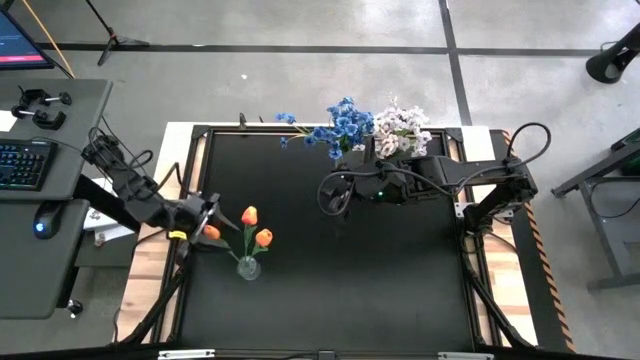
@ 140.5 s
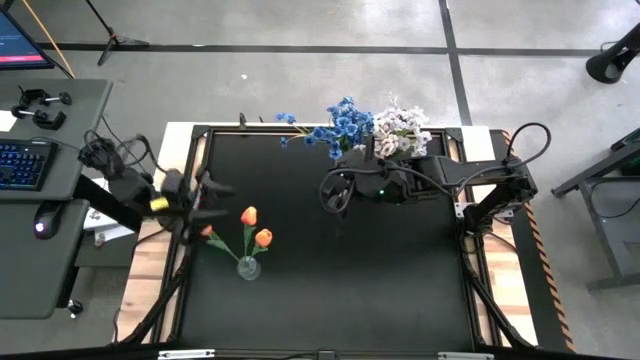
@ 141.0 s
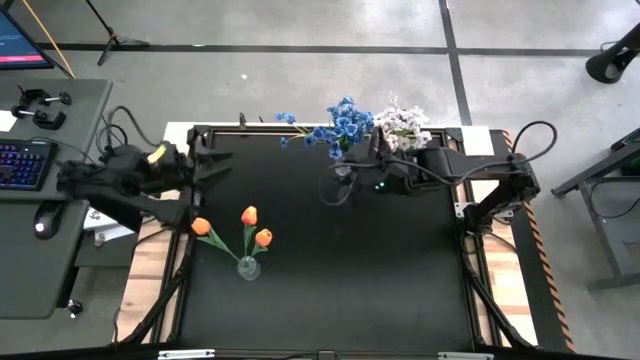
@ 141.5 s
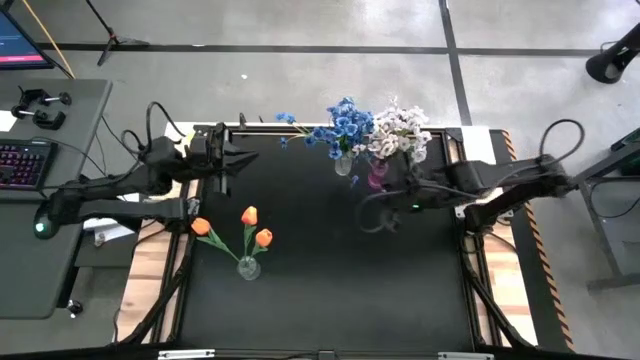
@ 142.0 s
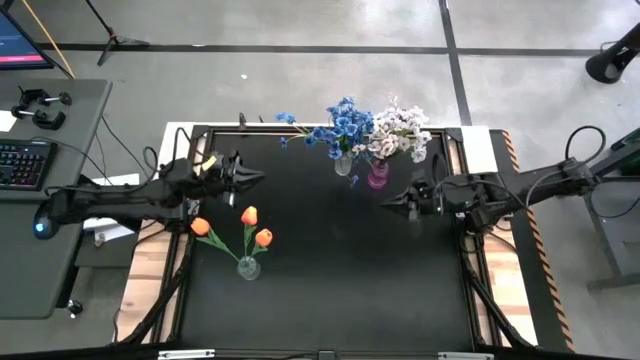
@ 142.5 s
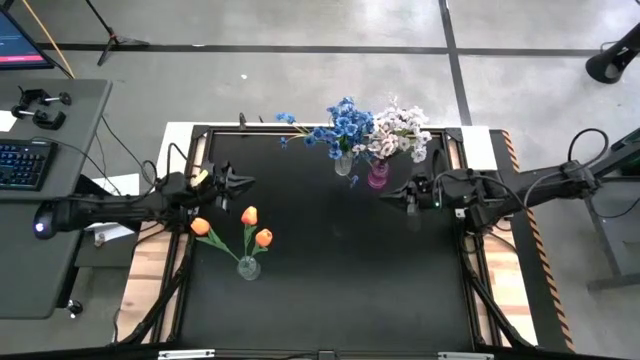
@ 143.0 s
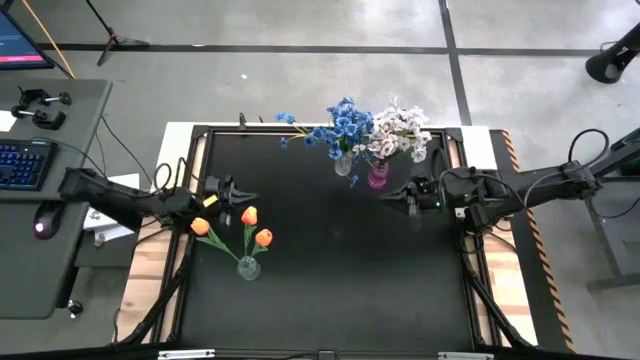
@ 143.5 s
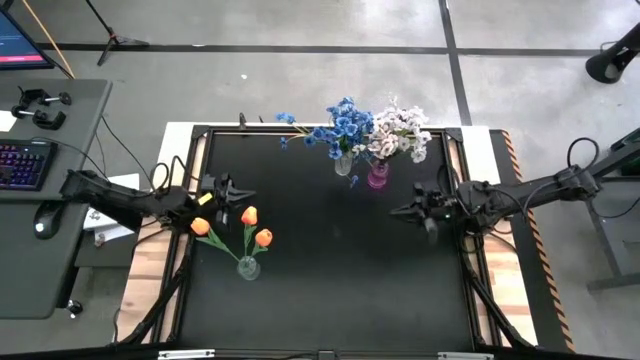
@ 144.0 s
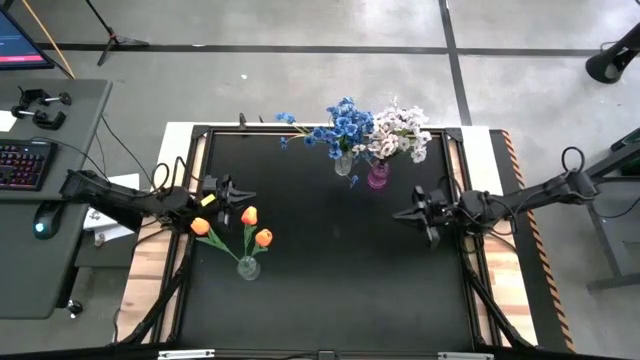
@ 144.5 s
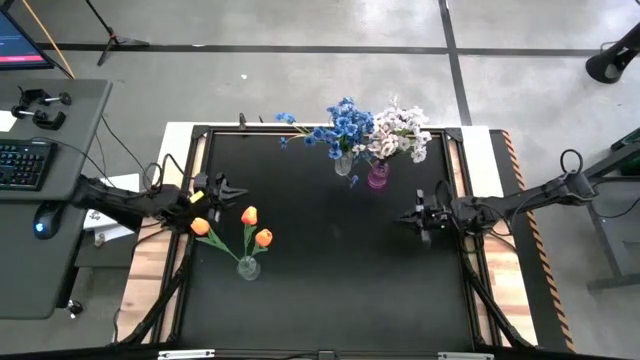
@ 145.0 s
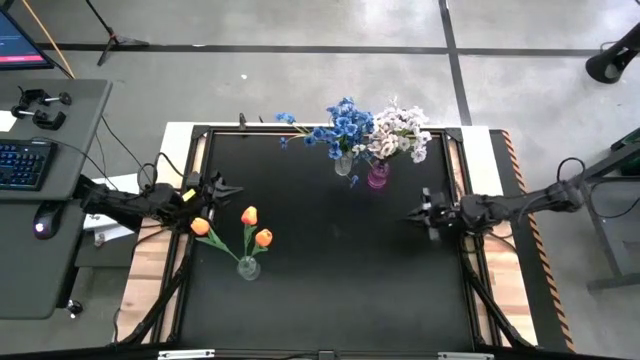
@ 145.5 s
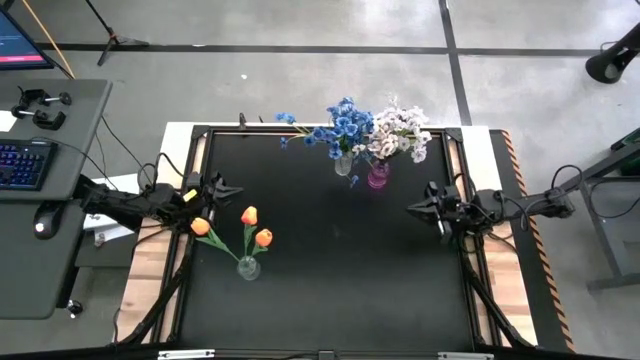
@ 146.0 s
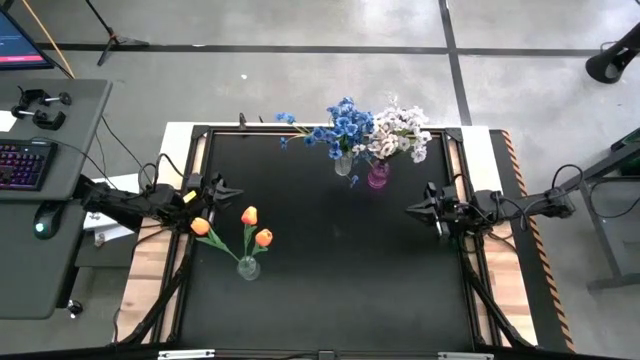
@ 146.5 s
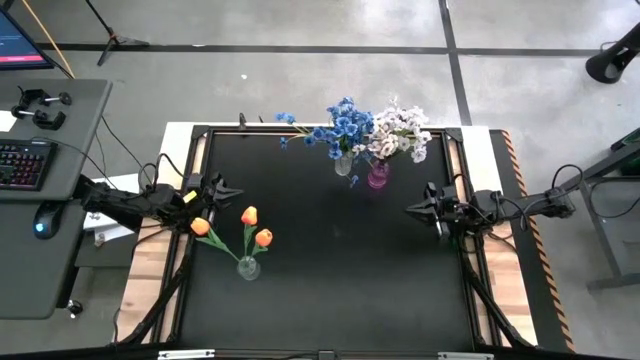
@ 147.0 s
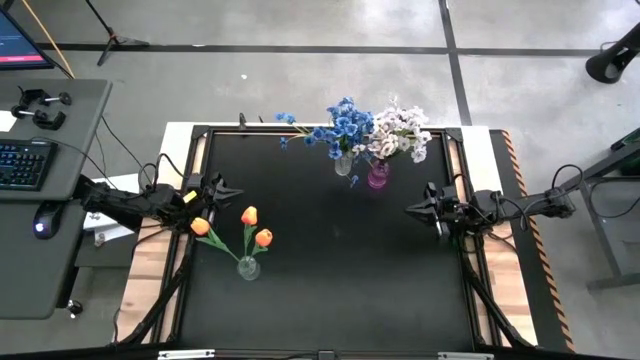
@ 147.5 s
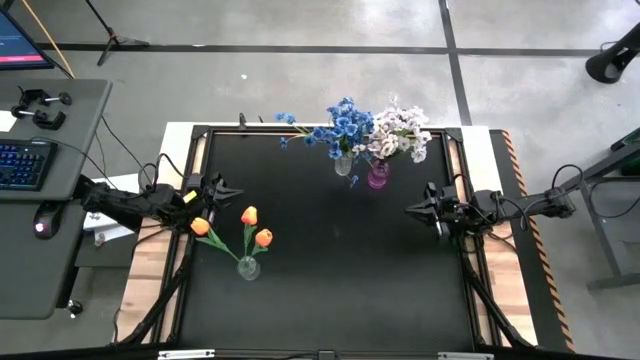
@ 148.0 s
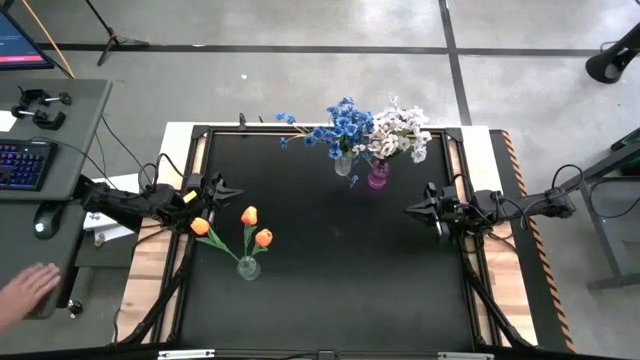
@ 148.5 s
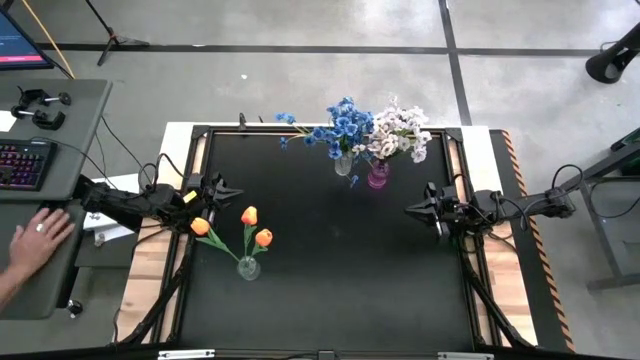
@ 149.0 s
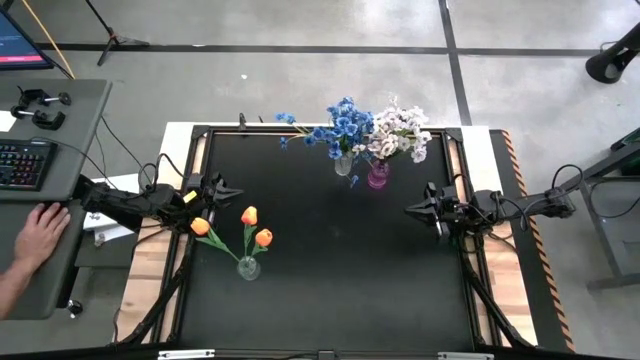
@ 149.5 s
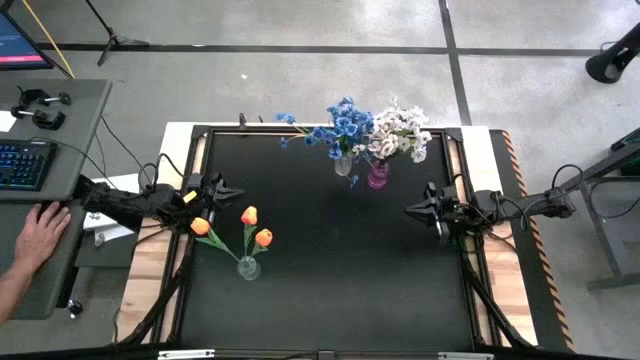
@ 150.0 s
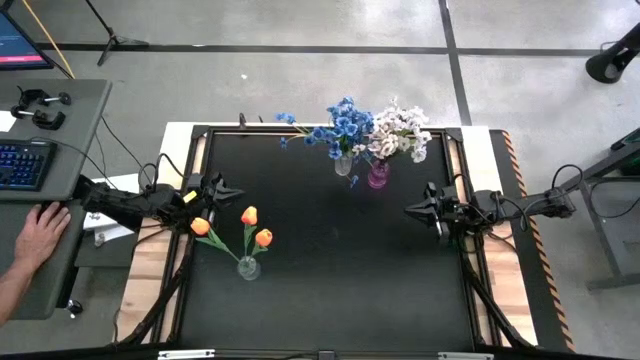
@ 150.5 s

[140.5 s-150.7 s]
Task: Sort flowers into vase by color
Return to Home Position

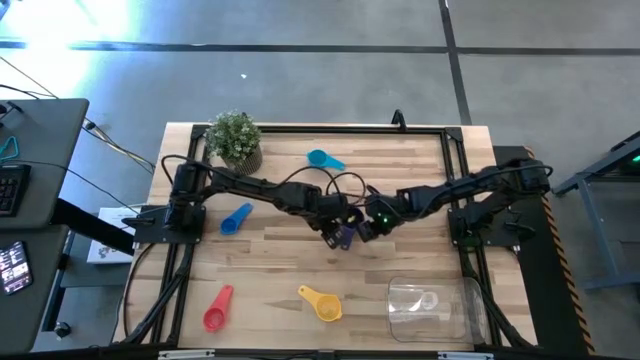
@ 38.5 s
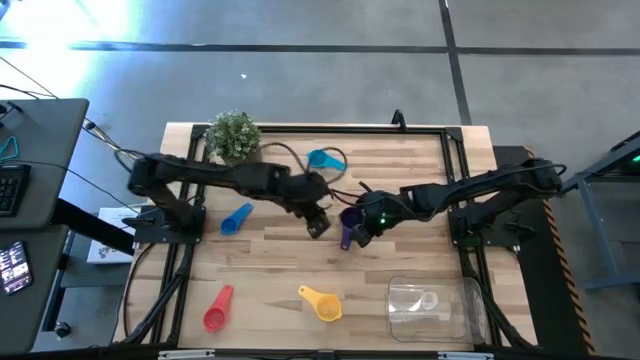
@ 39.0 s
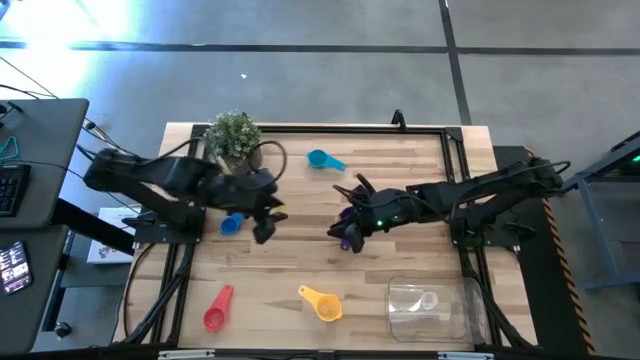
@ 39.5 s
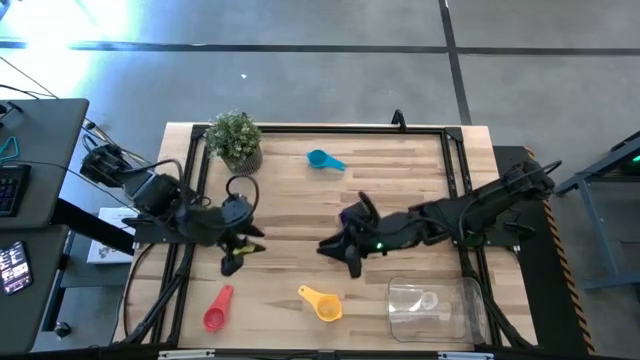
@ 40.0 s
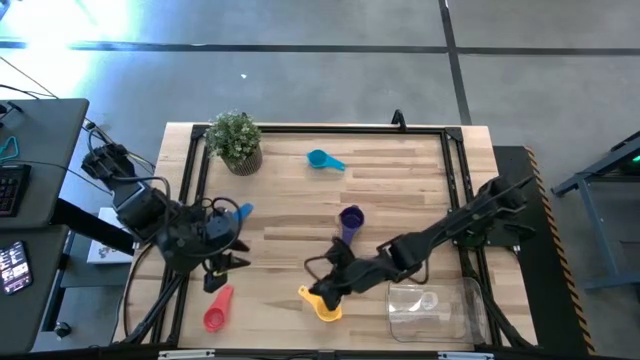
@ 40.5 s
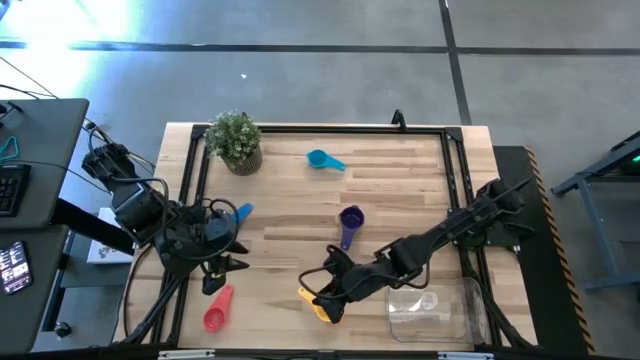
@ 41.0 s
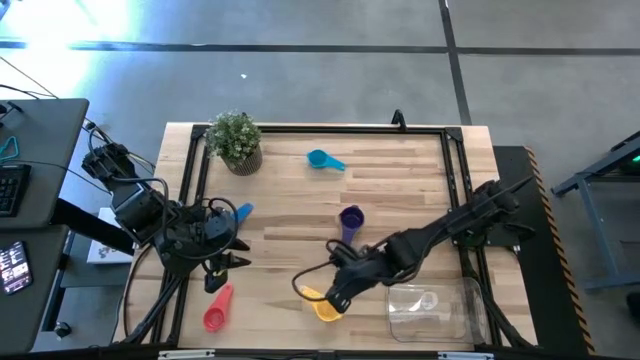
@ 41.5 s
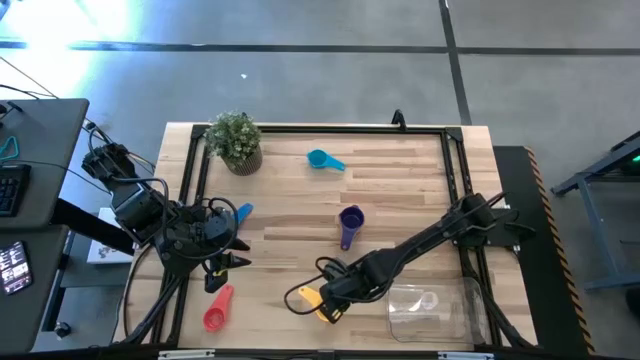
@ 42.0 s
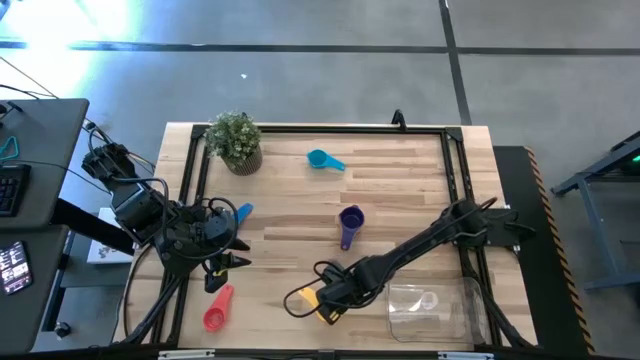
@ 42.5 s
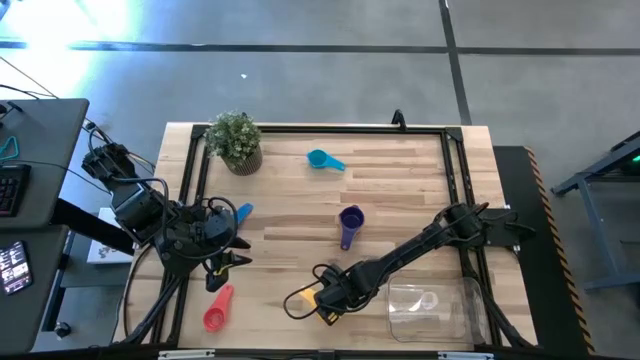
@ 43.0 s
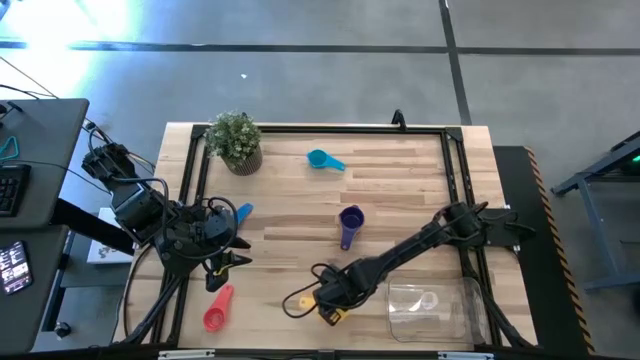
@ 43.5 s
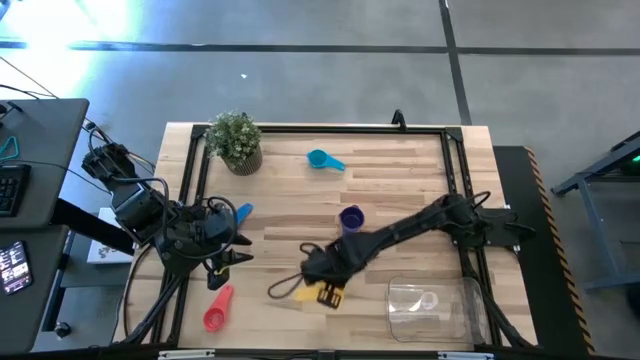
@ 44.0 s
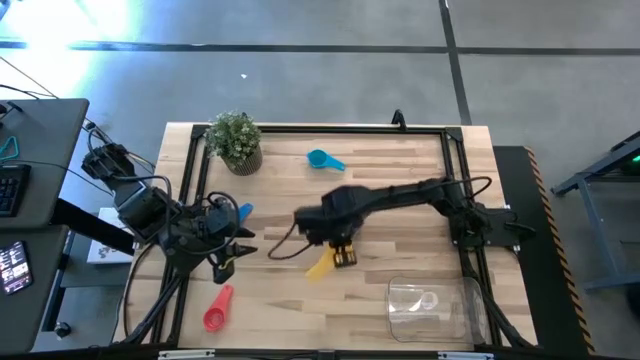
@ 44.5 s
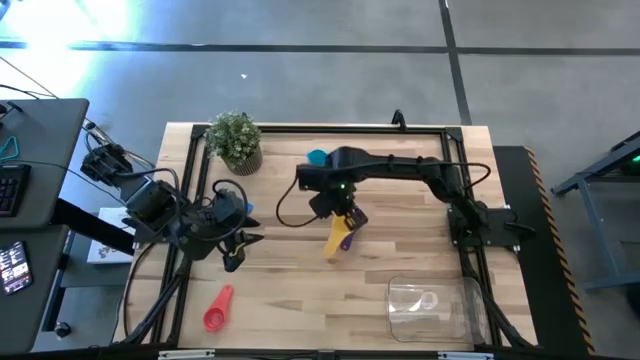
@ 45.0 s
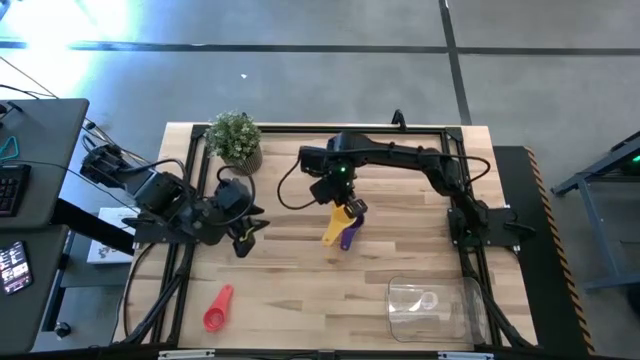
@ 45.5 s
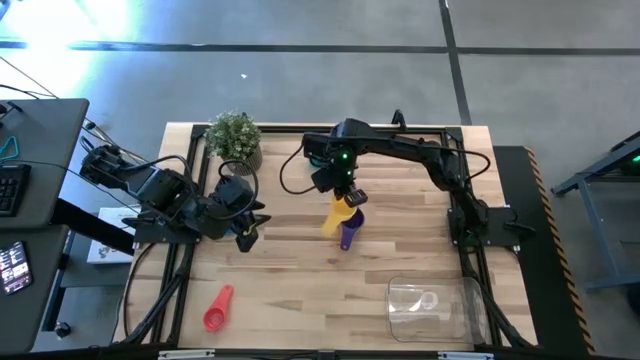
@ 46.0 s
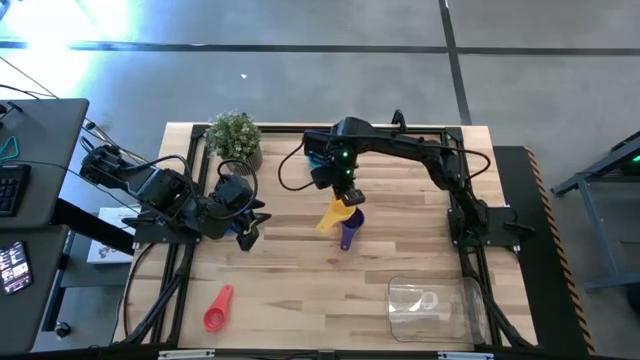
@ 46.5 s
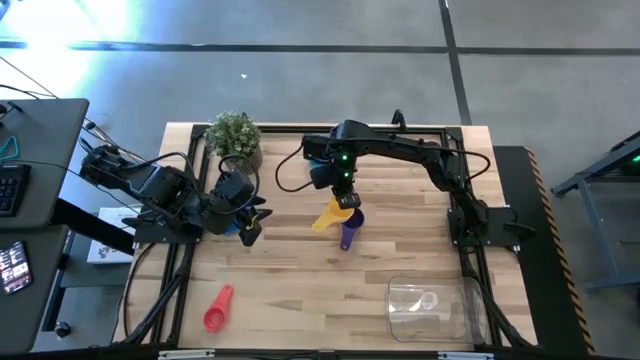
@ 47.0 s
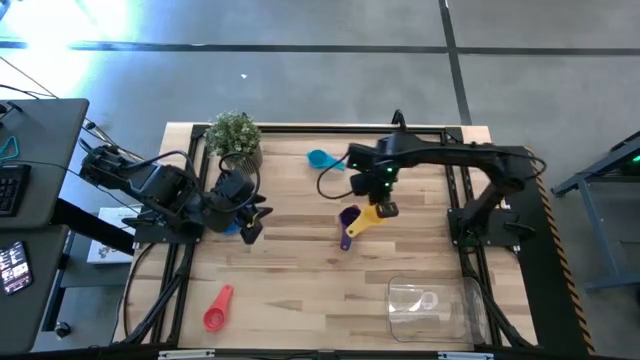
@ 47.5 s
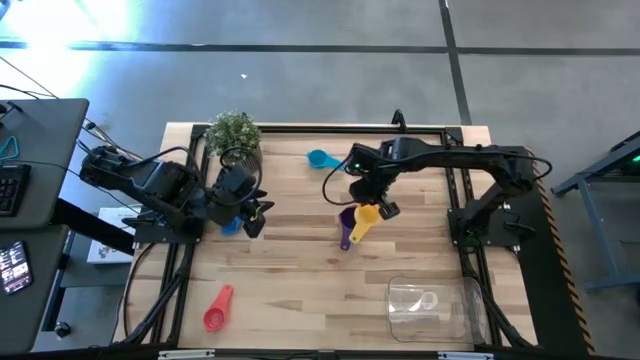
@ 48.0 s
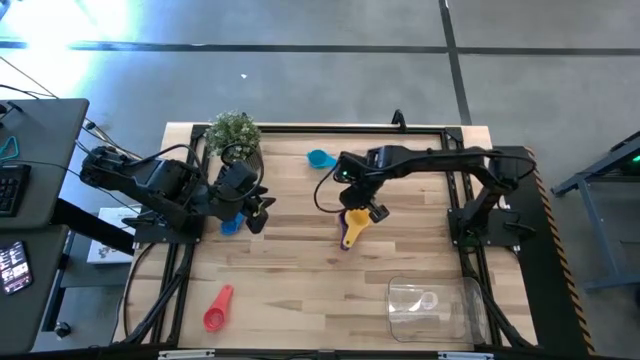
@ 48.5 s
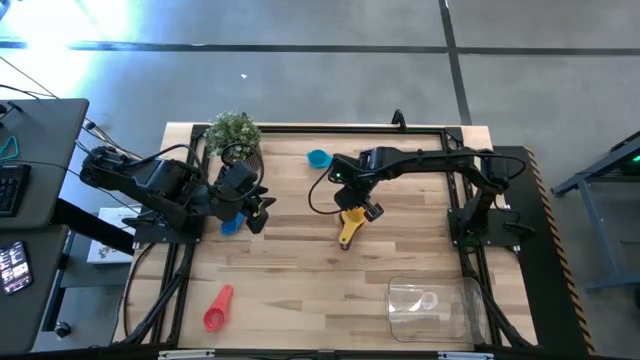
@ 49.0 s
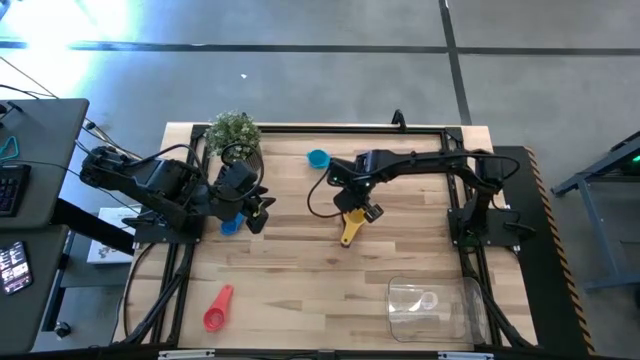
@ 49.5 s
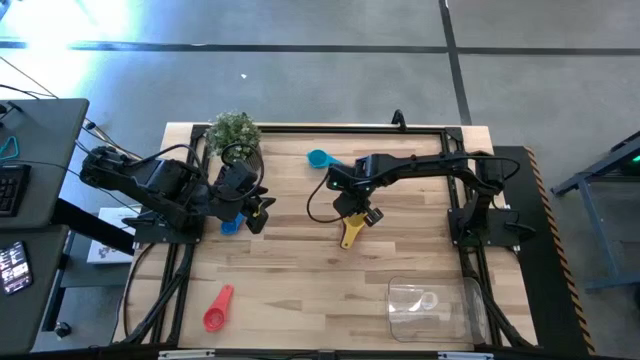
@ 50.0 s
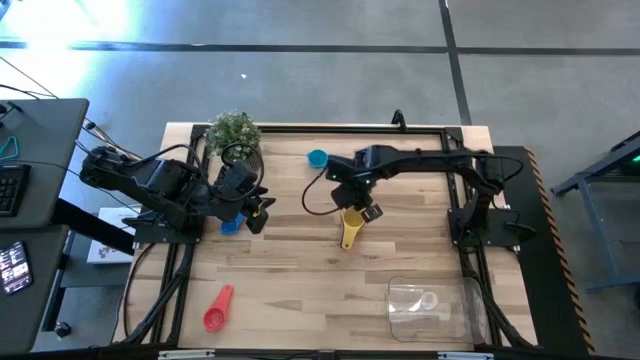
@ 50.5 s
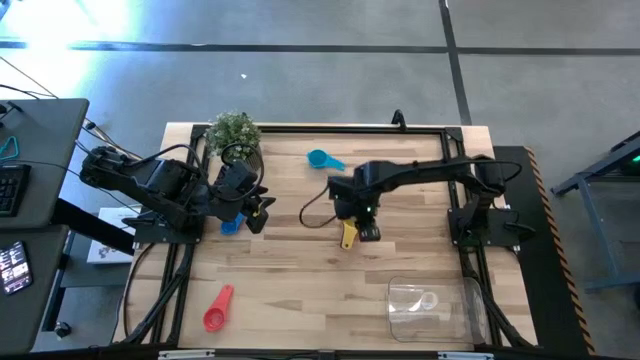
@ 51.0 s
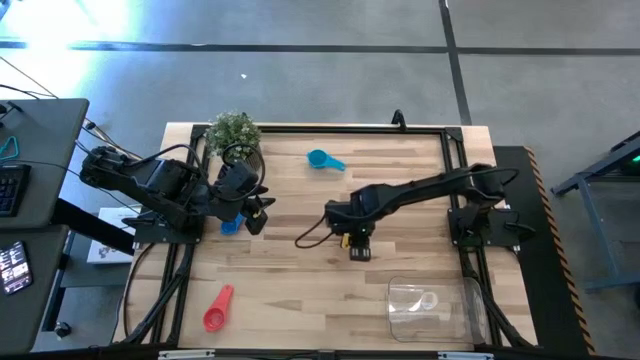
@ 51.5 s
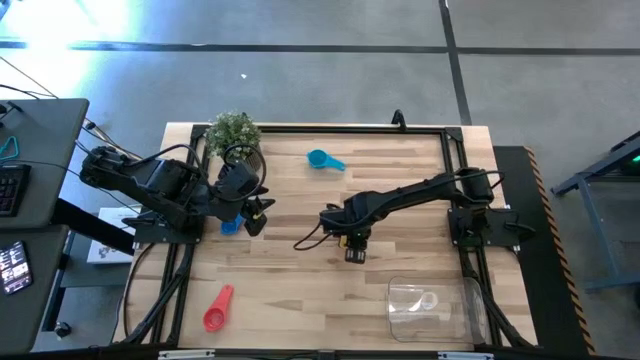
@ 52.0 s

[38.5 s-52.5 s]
Task: Nest measuring cups in basket
Stack the yellow measuring cup on top of the dark blue measuring cup
